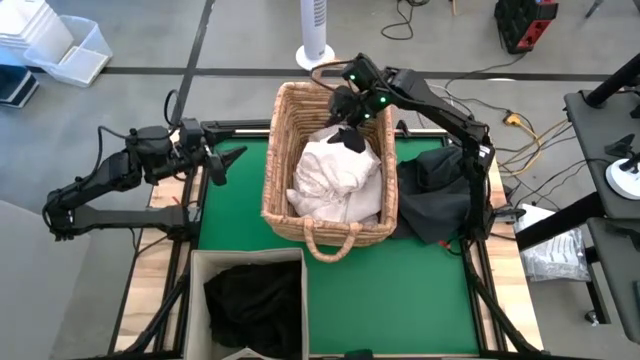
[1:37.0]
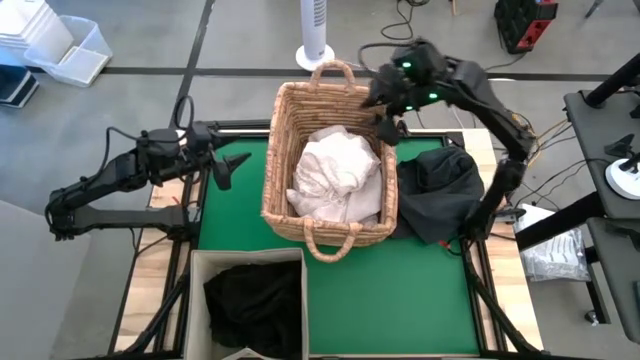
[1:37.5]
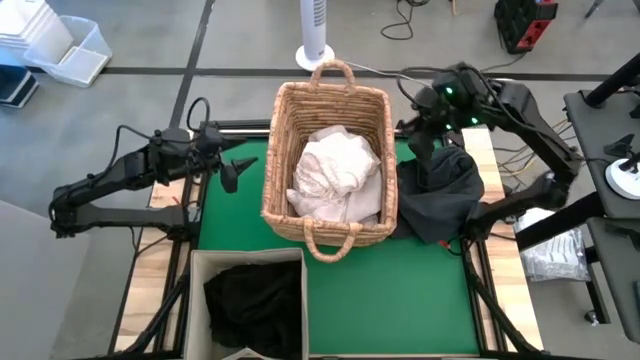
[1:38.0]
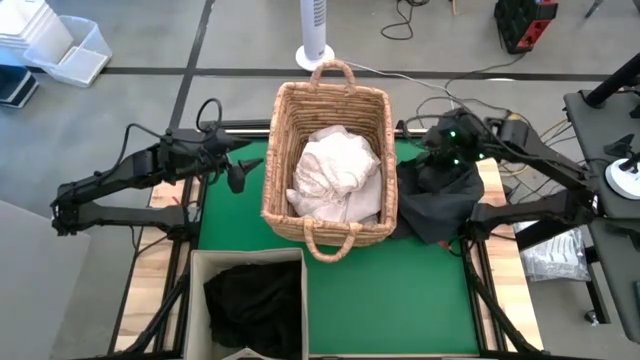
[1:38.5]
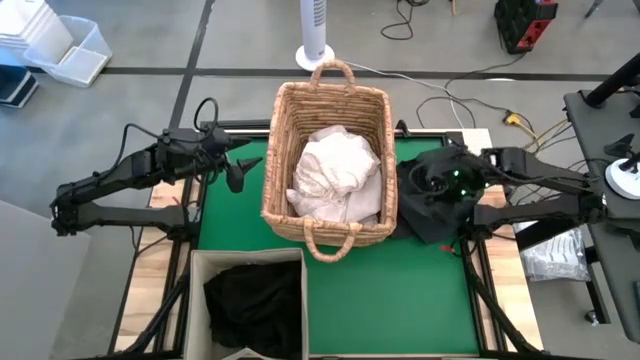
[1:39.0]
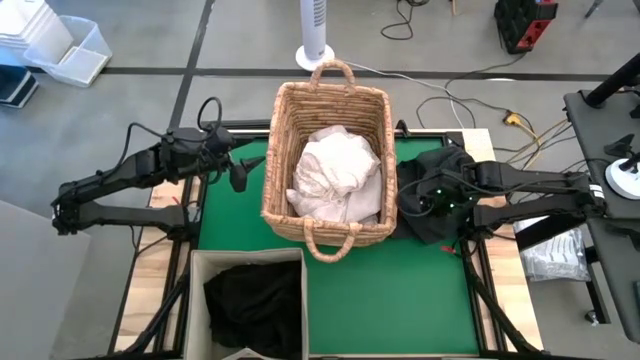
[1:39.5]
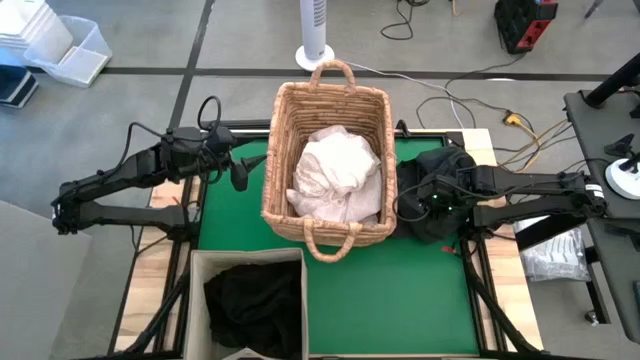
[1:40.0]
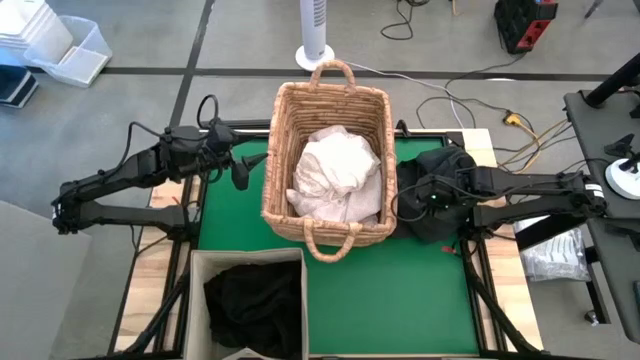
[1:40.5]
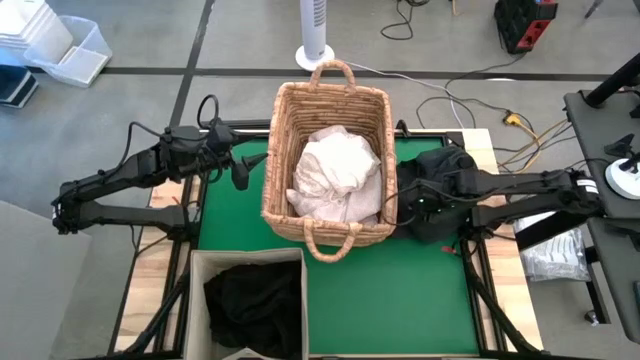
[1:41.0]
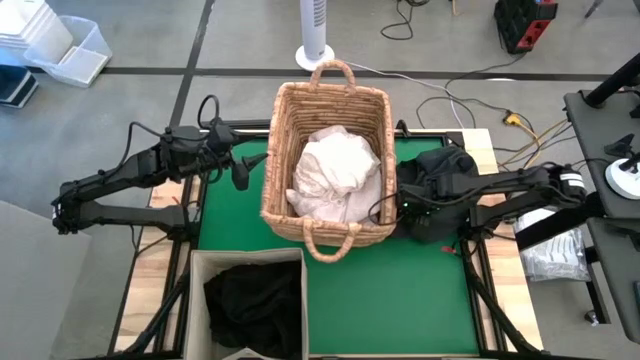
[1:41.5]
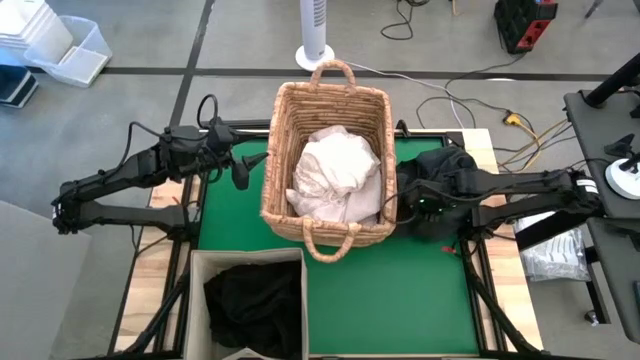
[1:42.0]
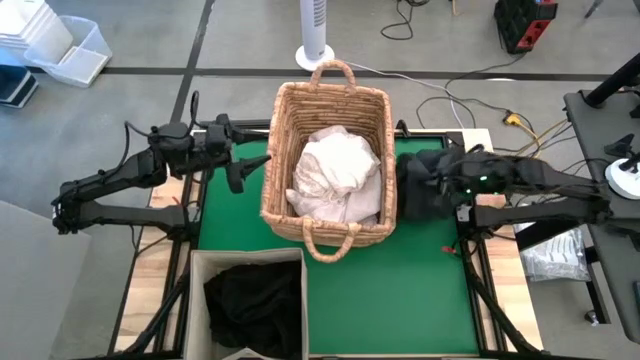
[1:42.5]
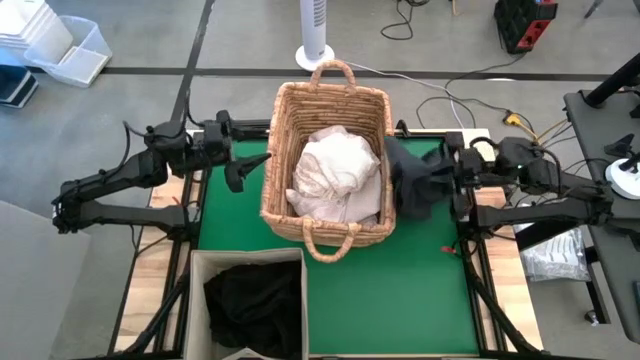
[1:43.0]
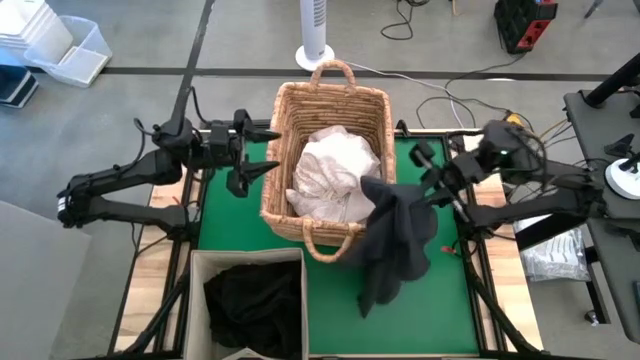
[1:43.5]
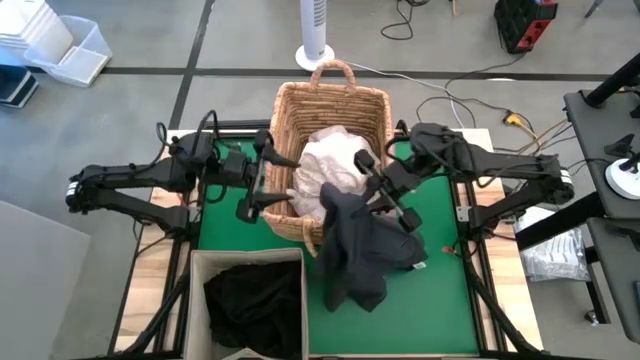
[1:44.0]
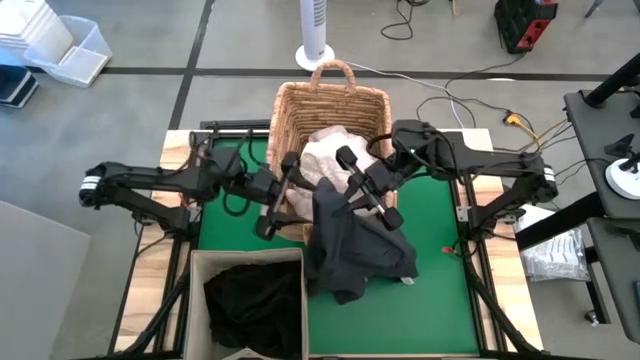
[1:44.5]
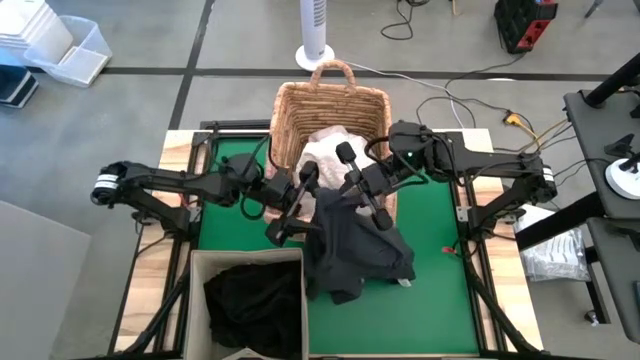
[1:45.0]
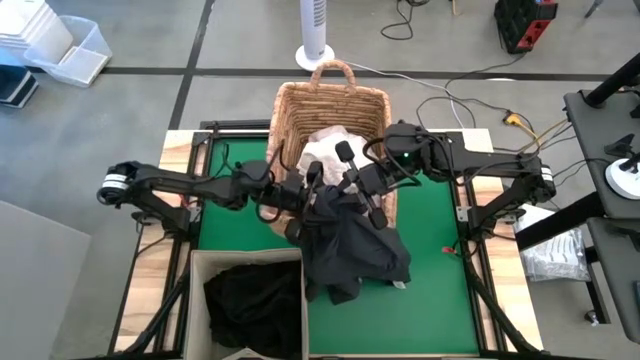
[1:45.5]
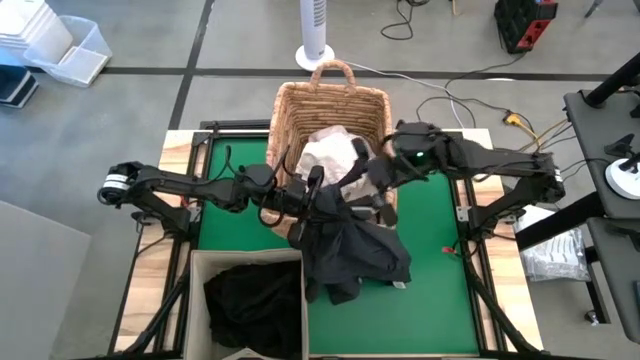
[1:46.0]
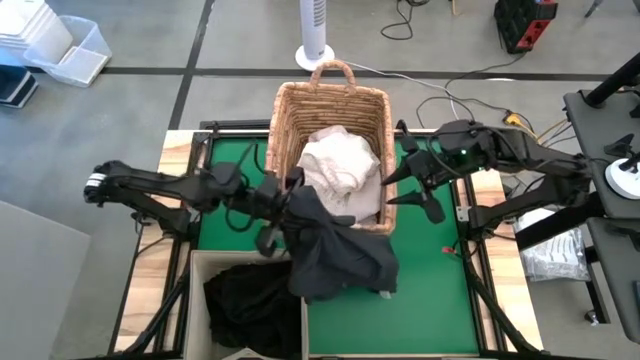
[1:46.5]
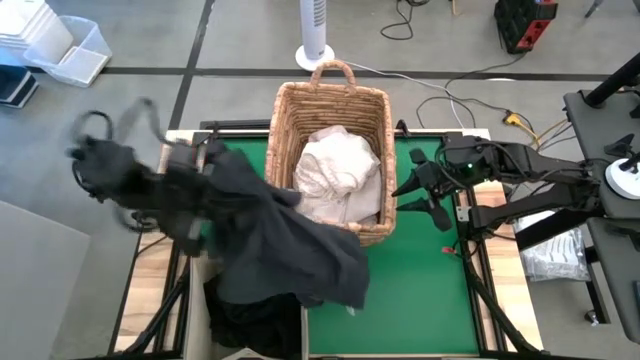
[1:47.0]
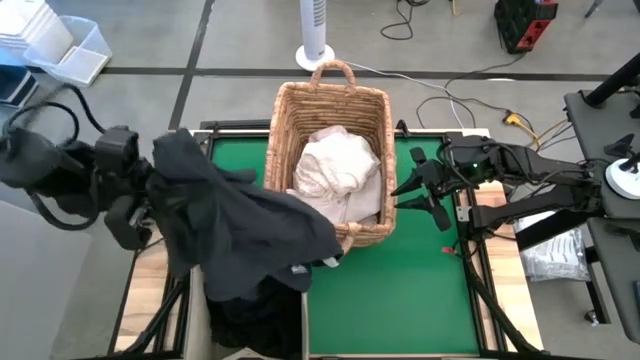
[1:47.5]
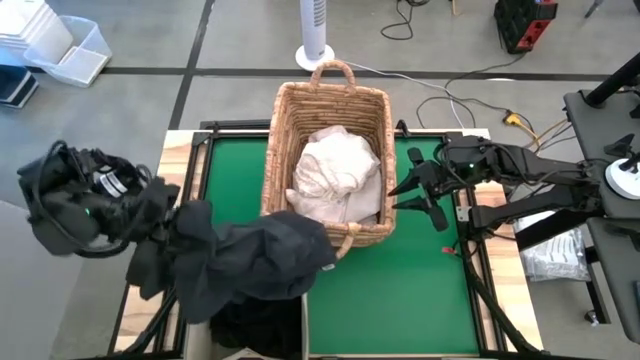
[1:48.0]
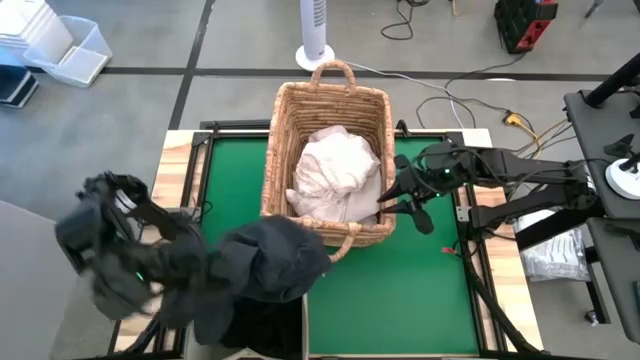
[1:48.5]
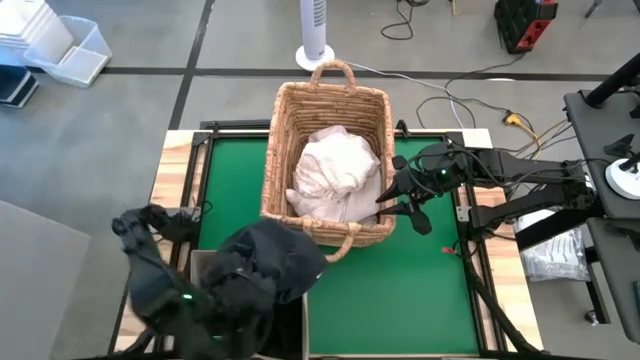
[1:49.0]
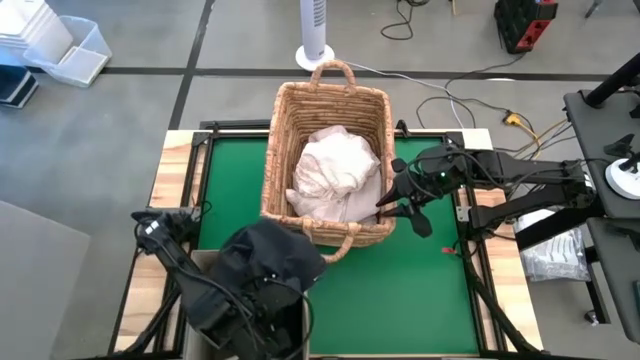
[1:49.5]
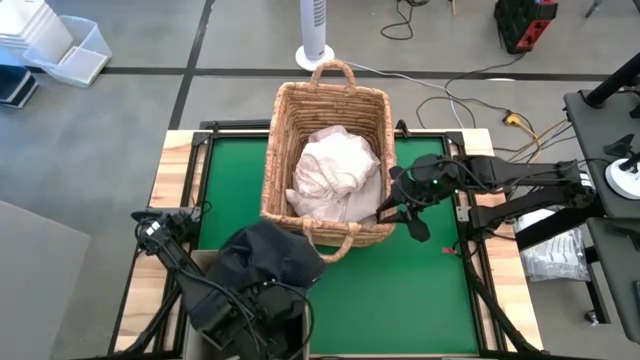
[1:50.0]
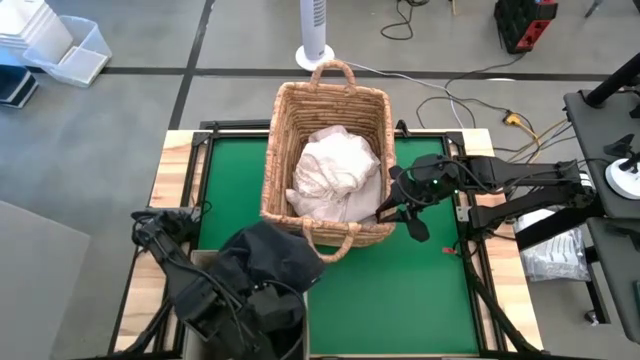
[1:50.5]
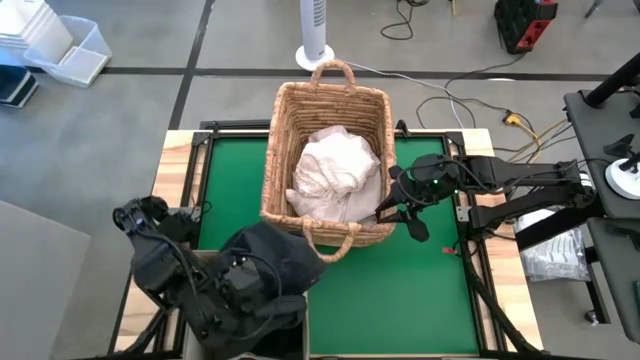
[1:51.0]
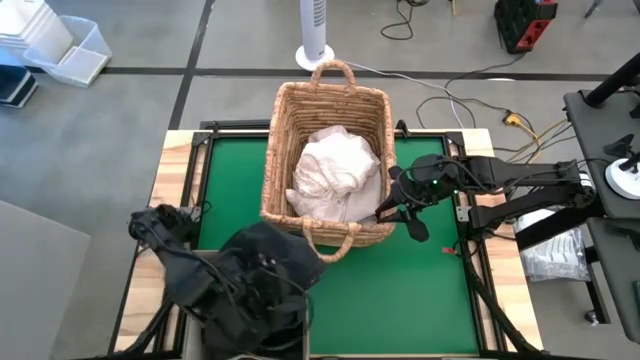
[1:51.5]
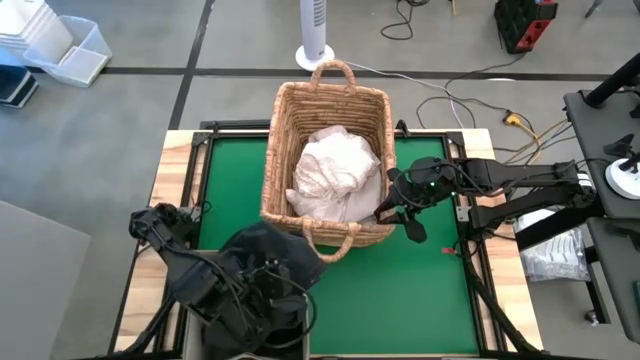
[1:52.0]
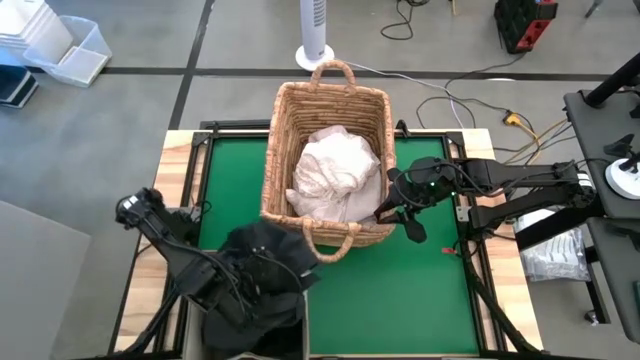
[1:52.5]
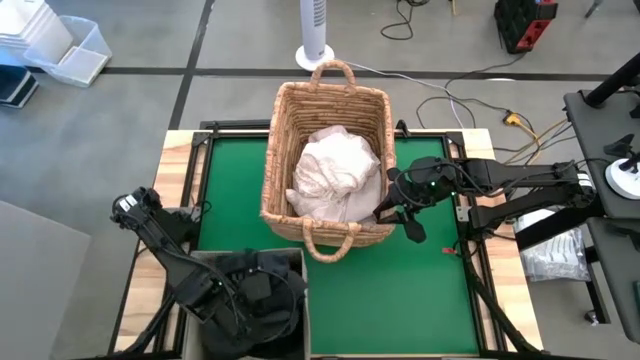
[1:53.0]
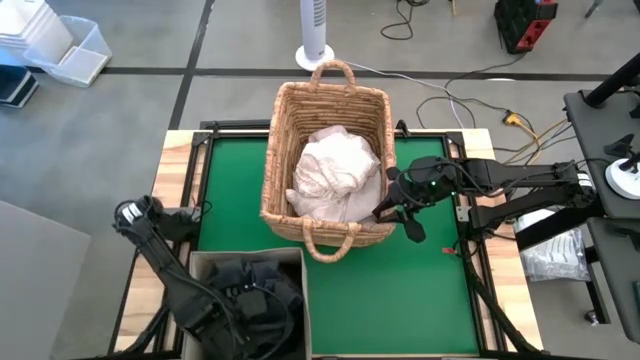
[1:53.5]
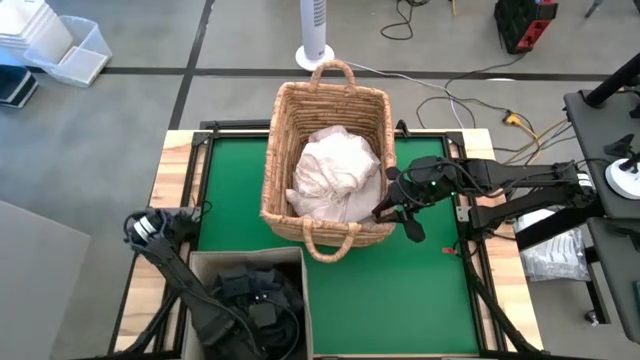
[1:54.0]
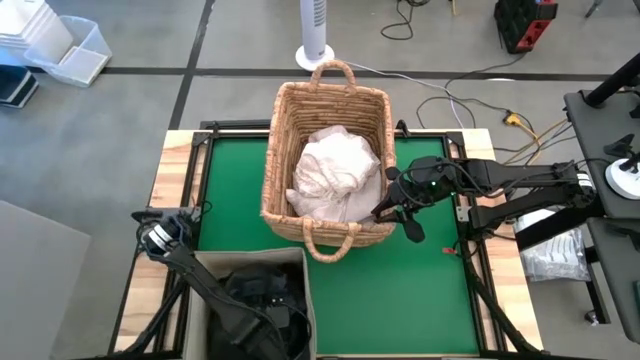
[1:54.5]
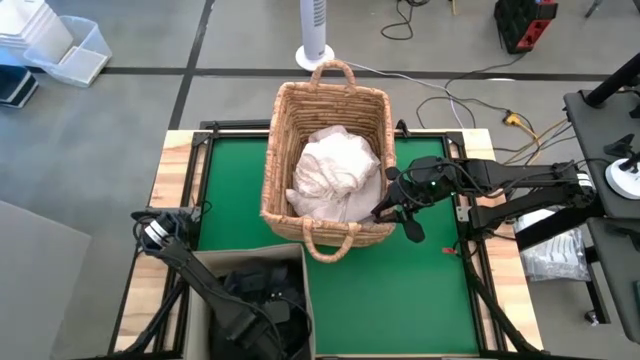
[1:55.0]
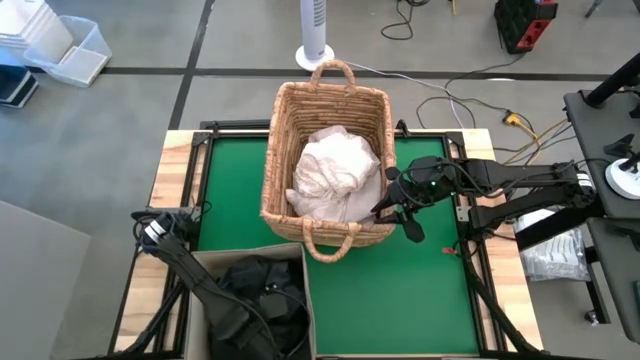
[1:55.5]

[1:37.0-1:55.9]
Put the black pants into the gray laundry bin
